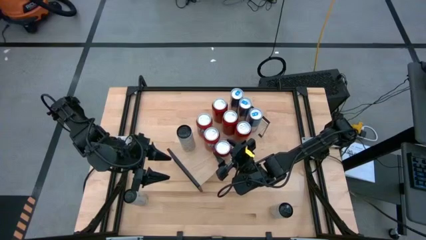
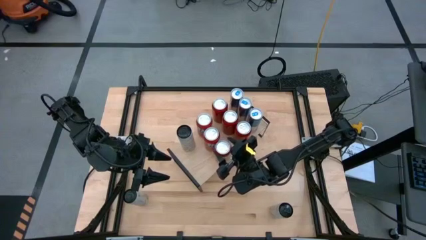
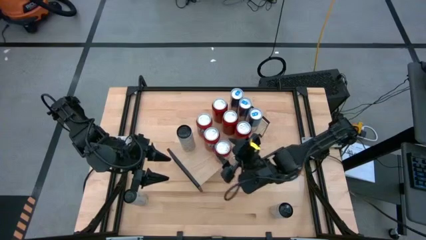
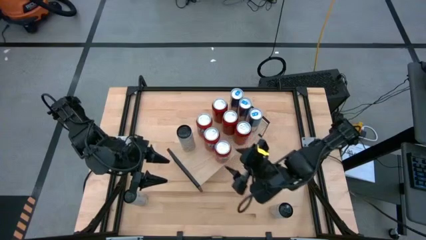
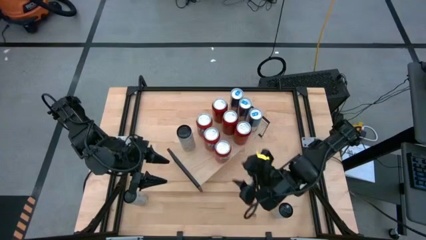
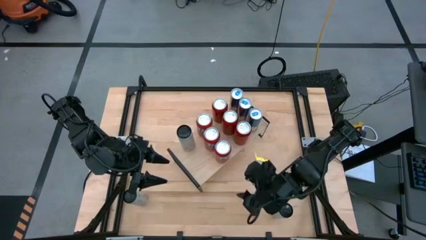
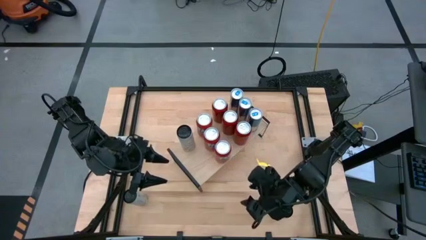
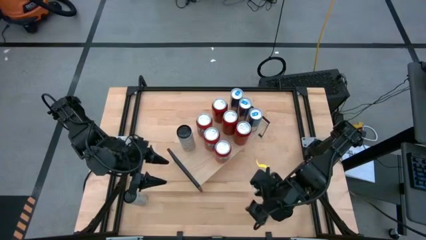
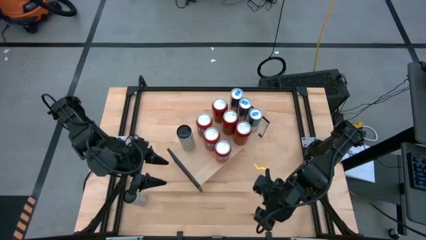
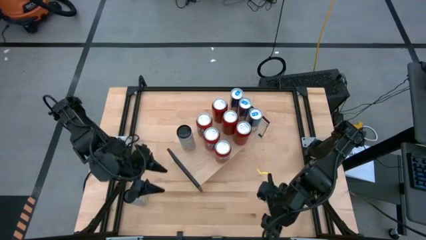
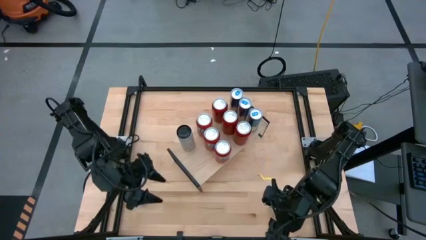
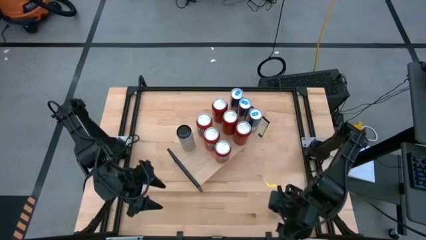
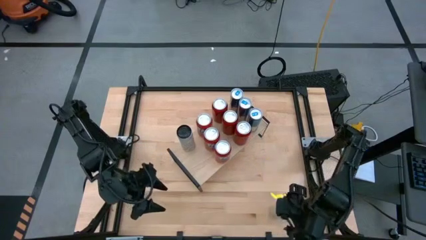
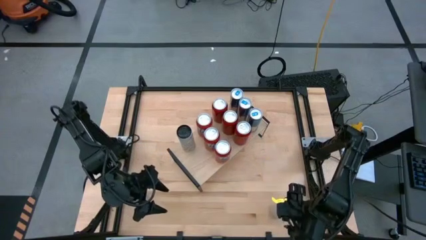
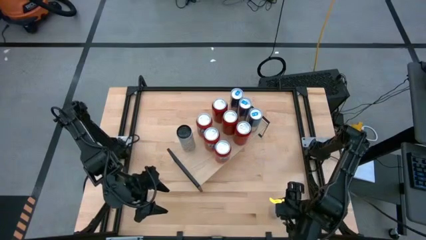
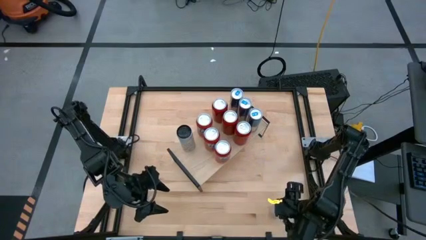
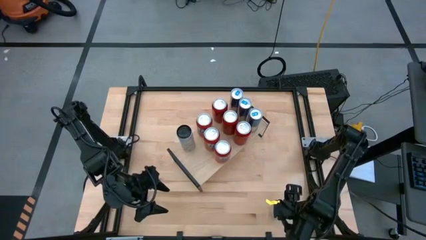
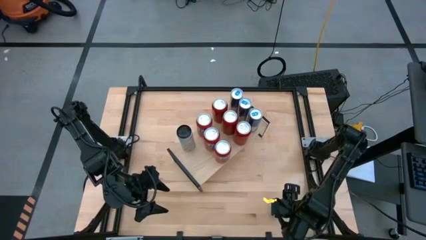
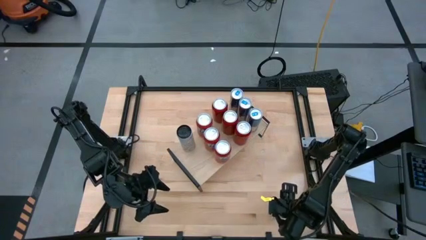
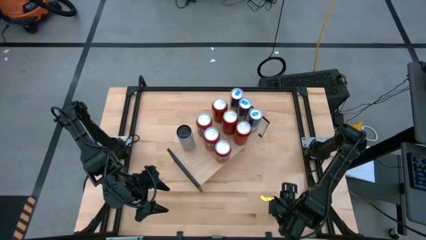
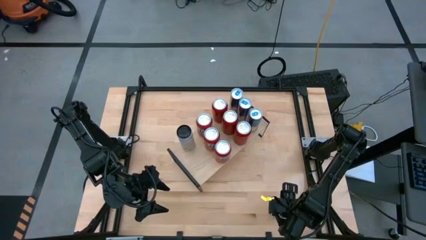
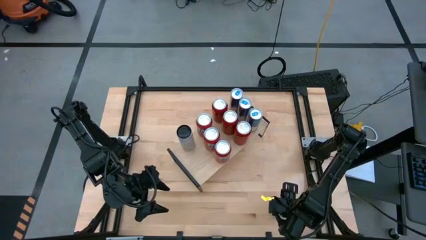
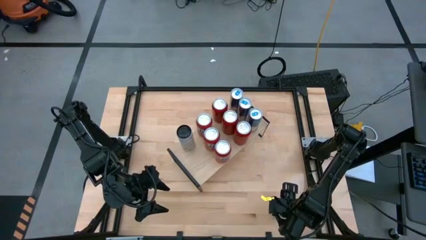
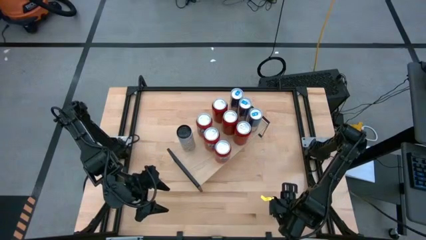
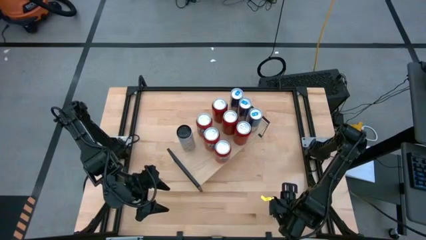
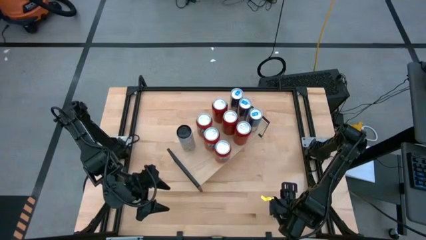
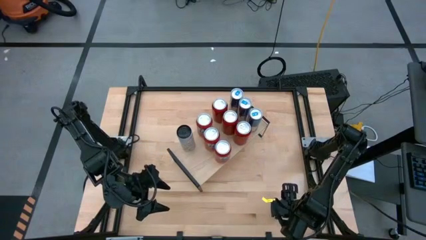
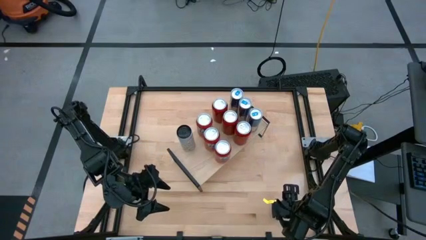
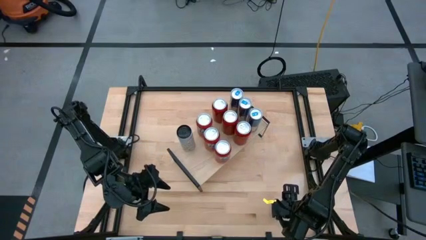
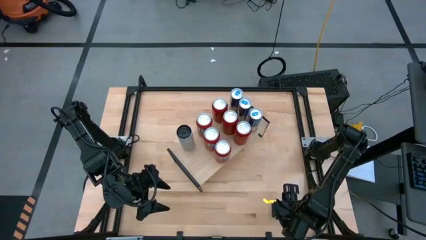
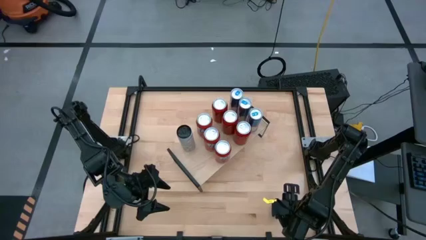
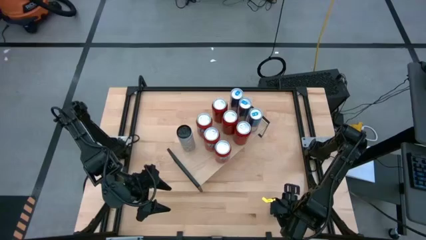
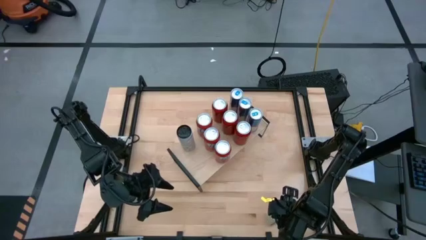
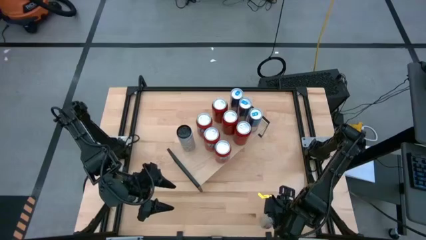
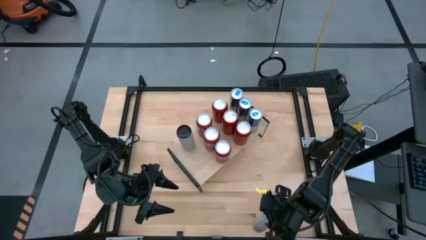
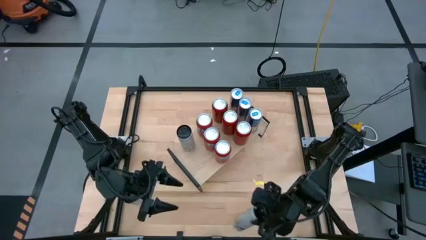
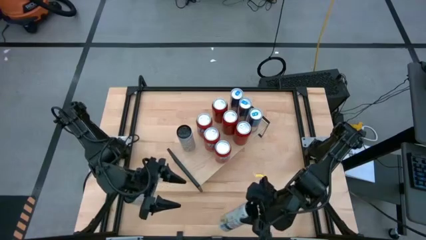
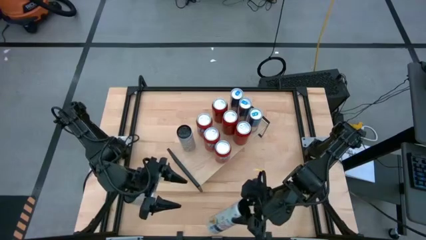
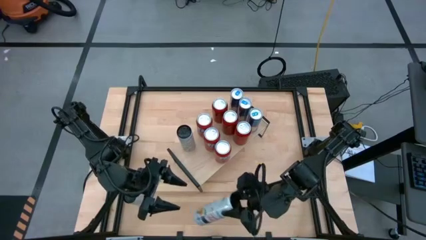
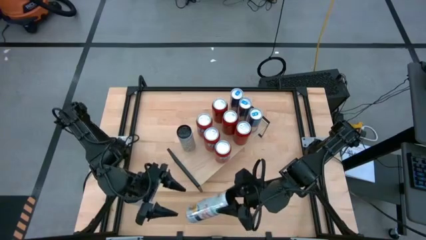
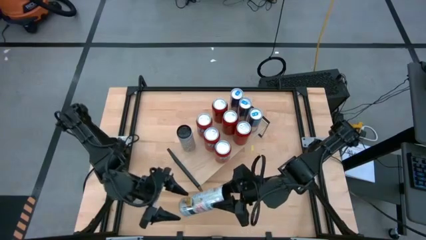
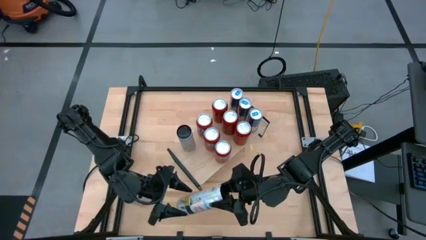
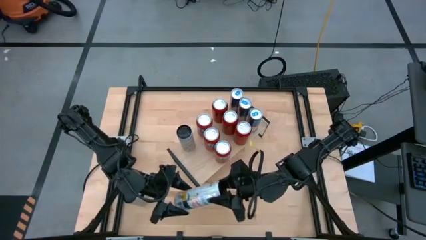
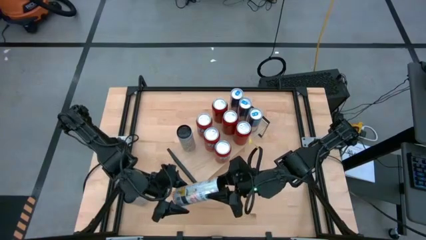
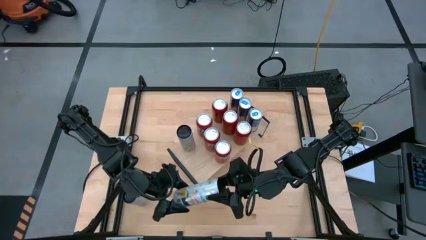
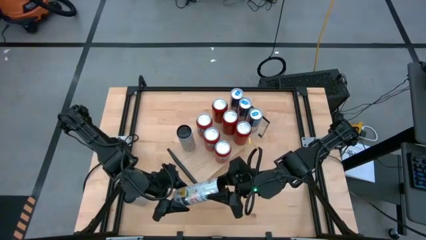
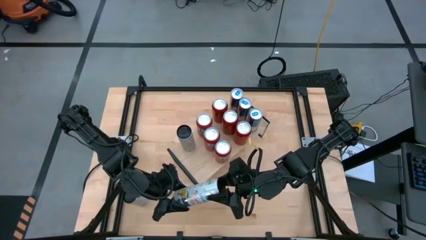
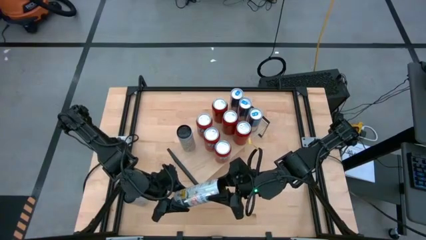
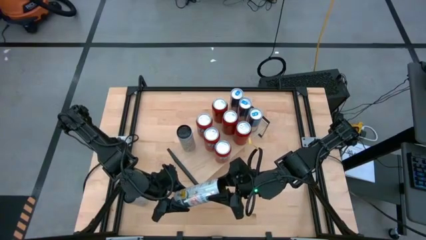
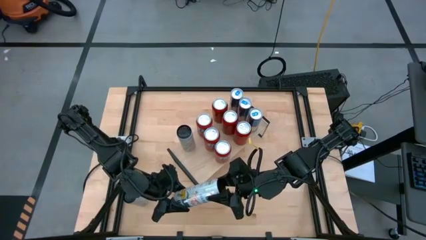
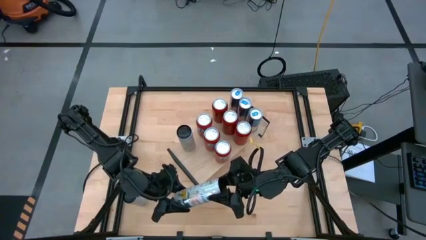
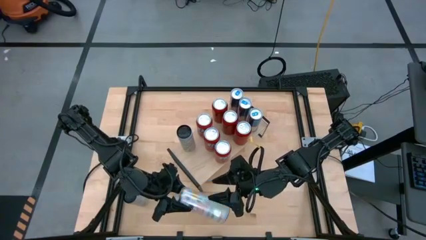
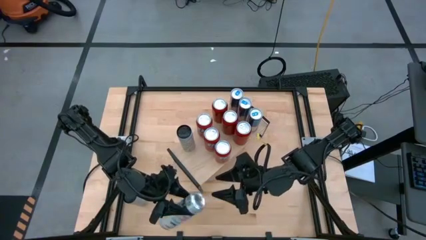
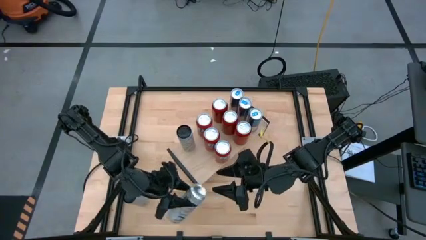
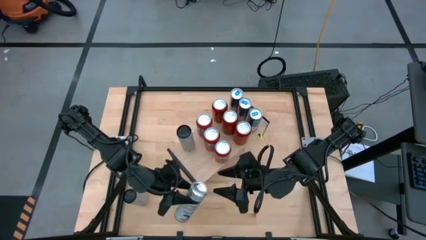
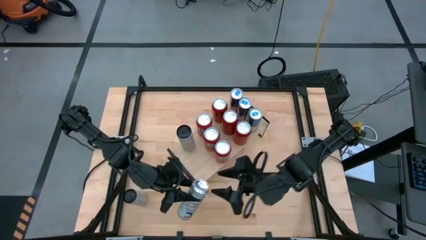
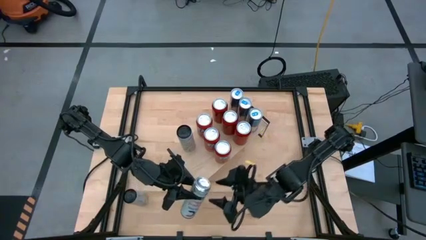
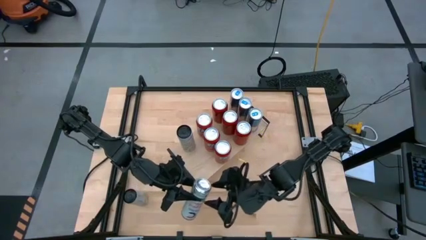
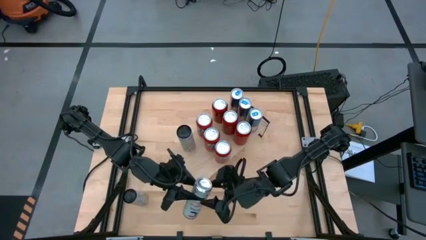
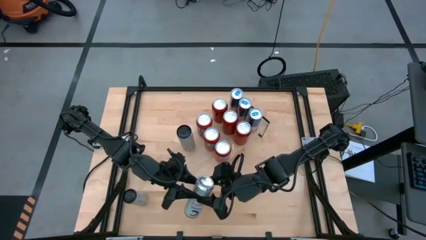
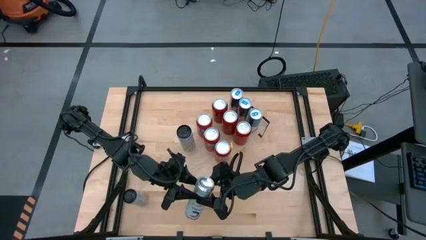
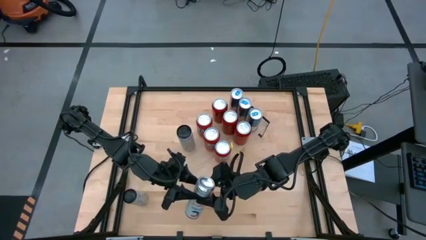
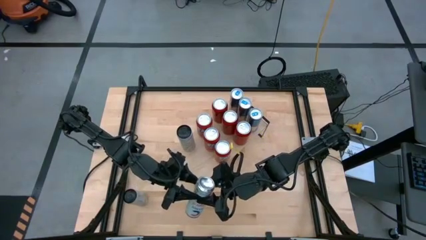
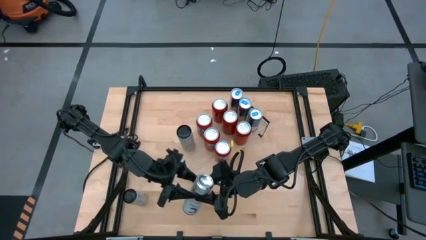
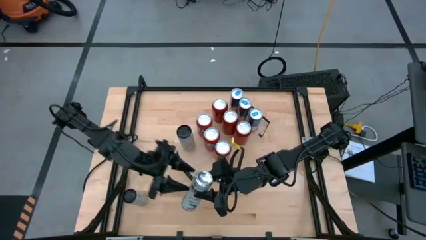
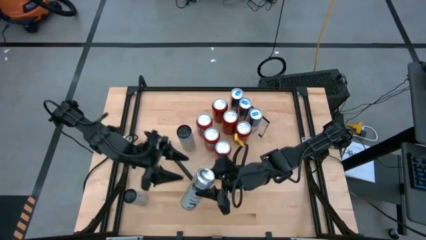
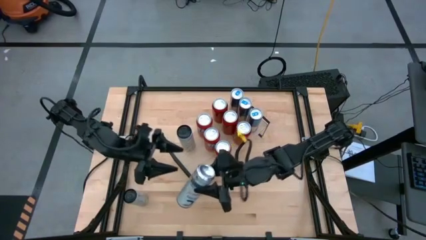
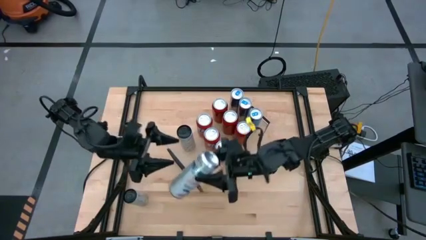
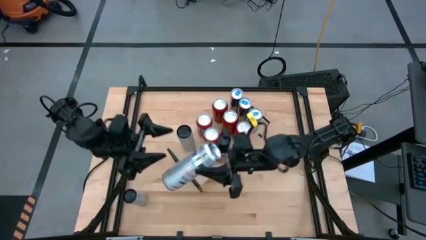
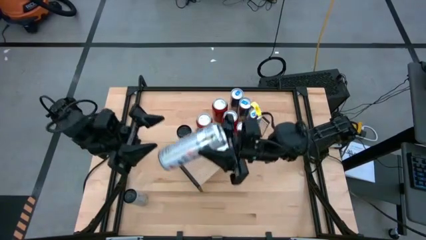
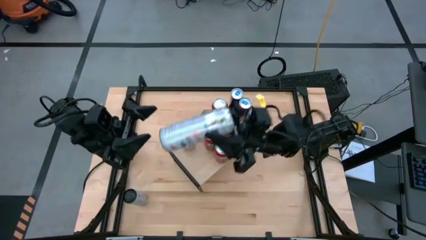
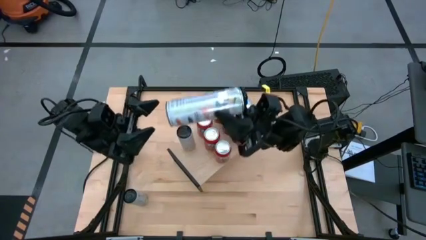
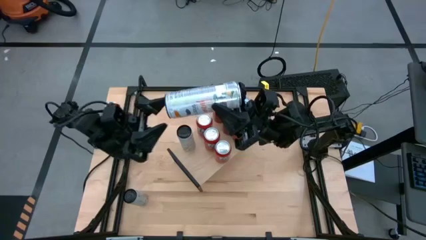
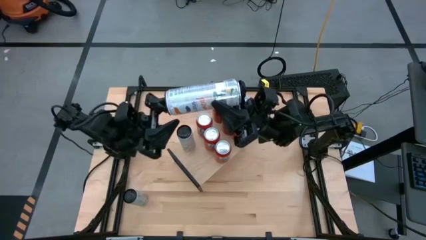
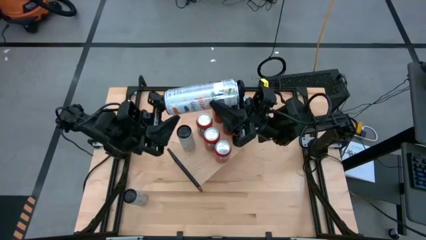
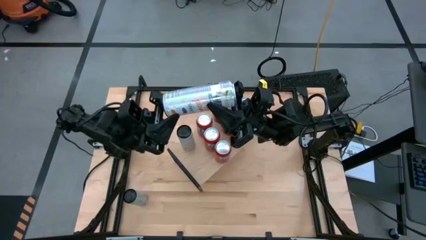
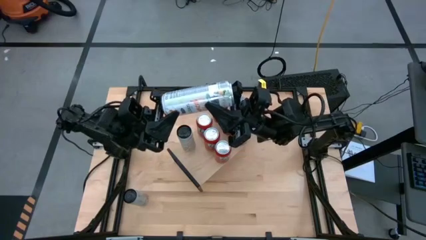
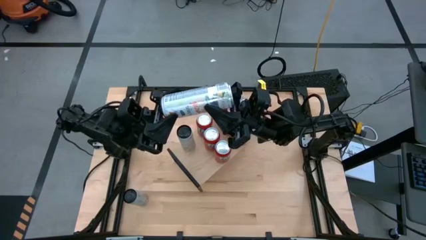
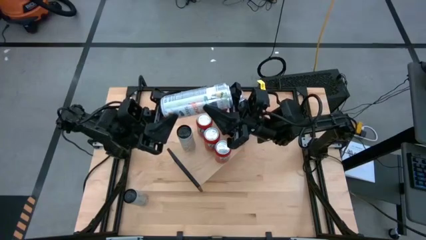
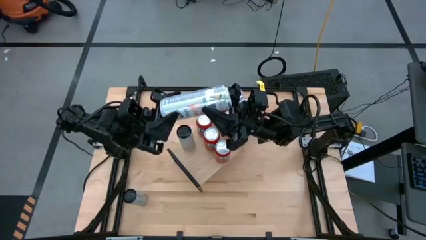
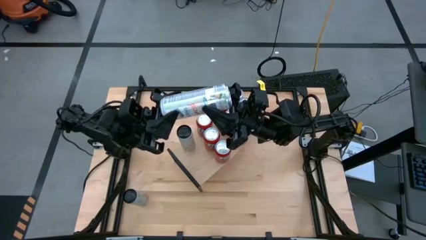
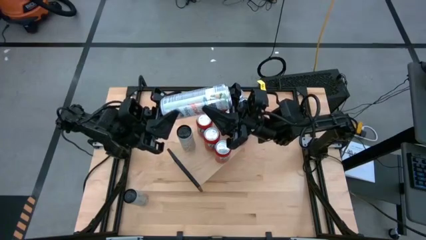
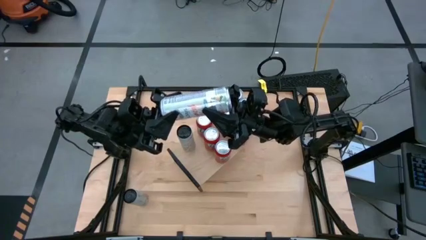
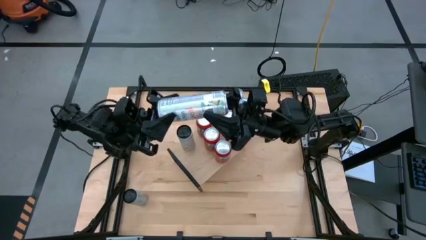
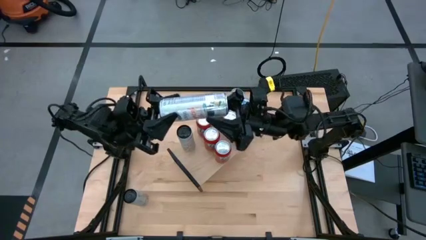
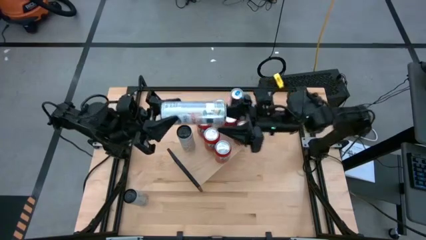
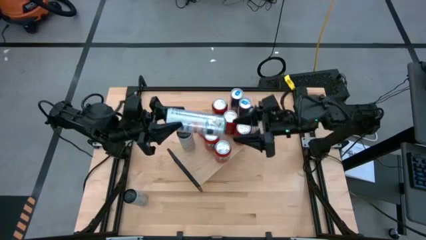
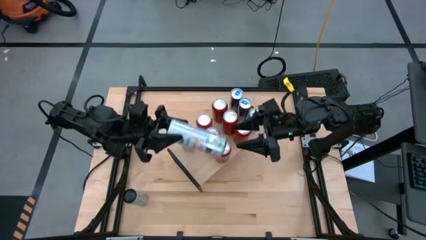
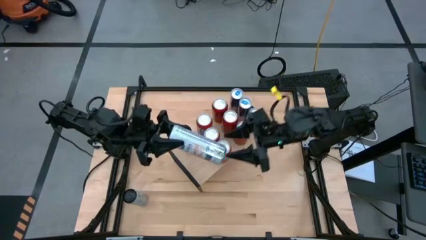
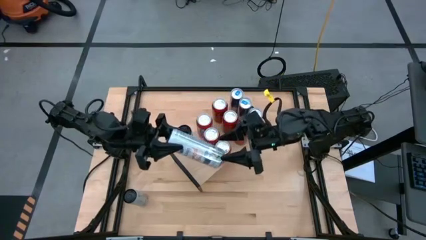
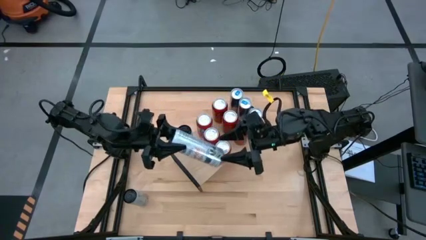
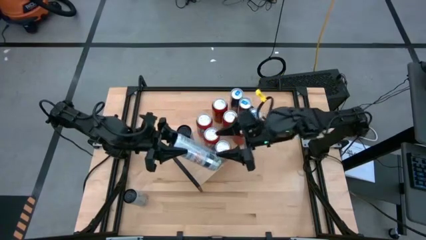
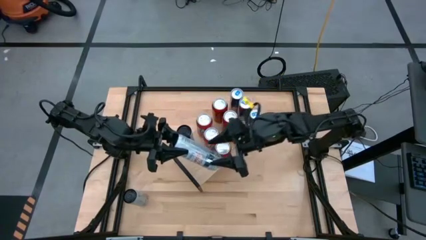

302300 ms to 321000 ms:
Task: Place canned beverage on shelf
Put the right white soda can on the shelf
